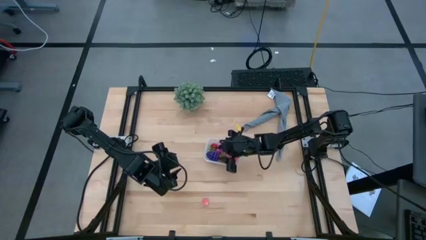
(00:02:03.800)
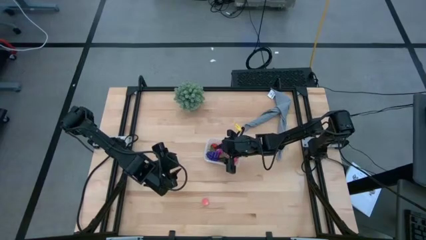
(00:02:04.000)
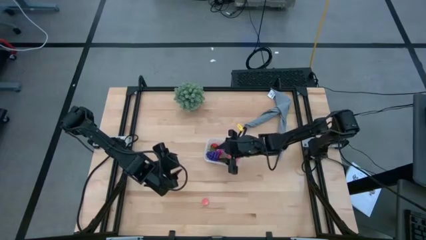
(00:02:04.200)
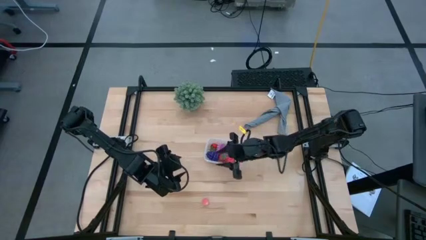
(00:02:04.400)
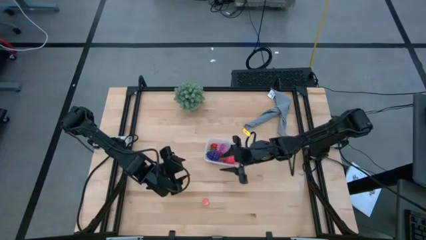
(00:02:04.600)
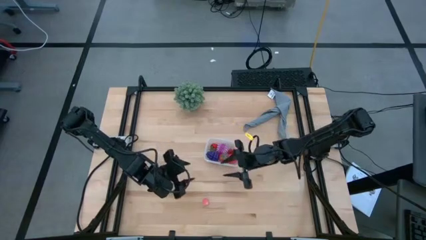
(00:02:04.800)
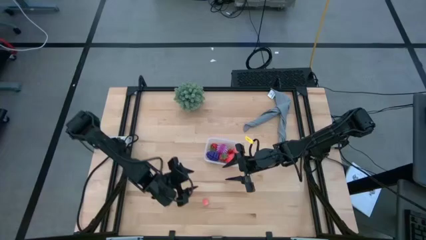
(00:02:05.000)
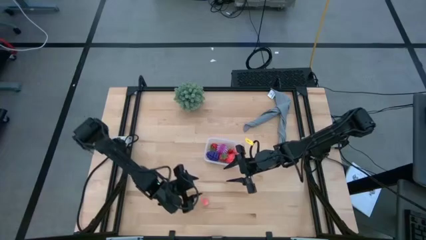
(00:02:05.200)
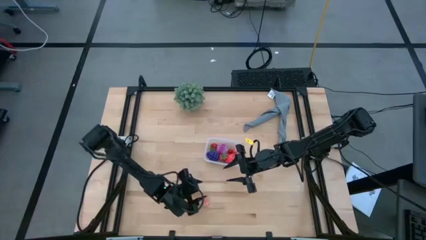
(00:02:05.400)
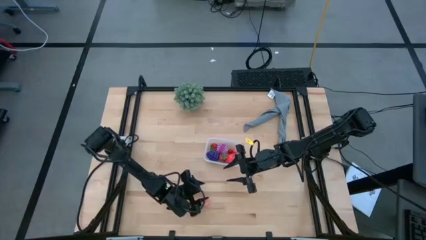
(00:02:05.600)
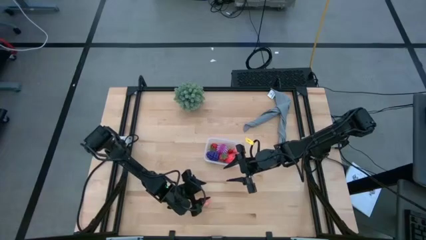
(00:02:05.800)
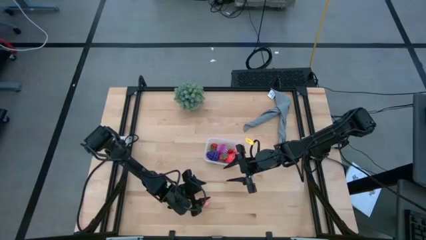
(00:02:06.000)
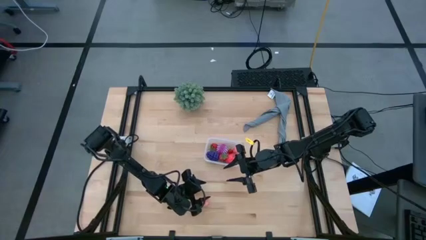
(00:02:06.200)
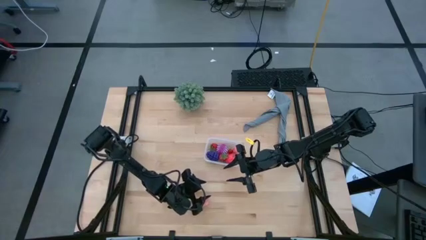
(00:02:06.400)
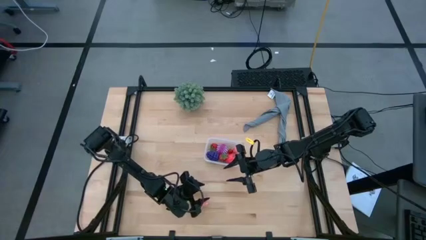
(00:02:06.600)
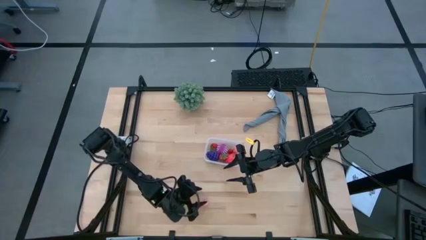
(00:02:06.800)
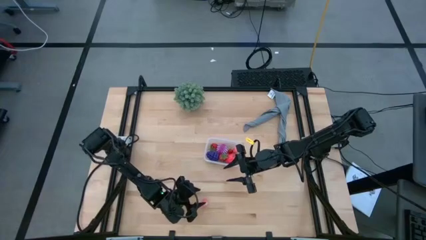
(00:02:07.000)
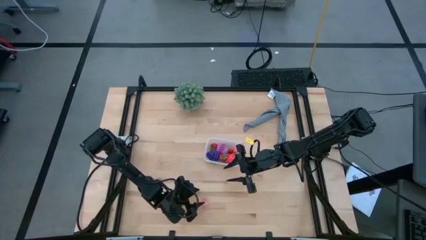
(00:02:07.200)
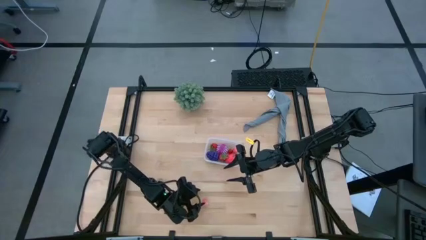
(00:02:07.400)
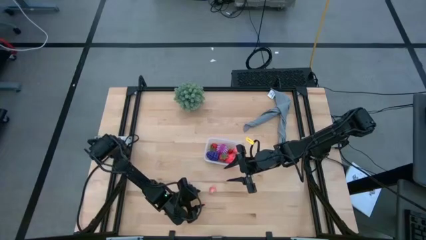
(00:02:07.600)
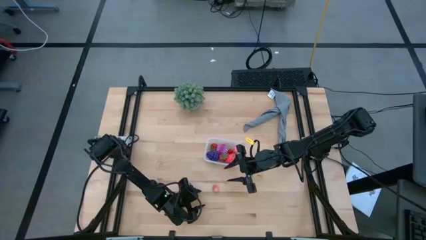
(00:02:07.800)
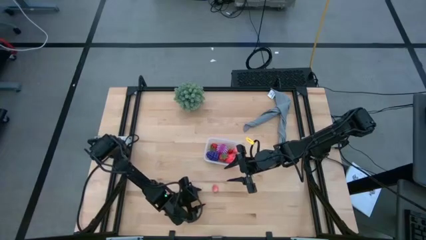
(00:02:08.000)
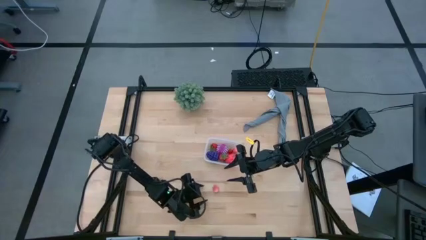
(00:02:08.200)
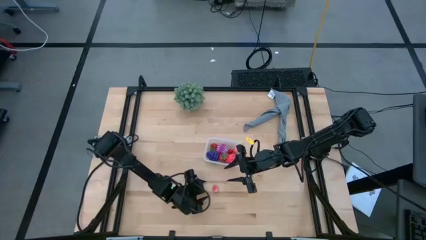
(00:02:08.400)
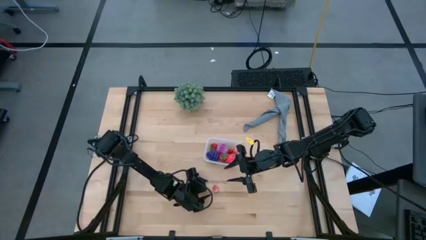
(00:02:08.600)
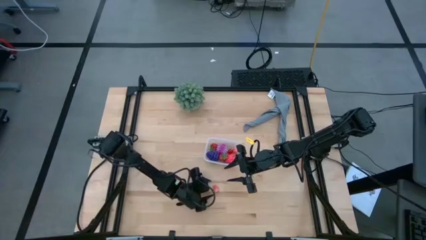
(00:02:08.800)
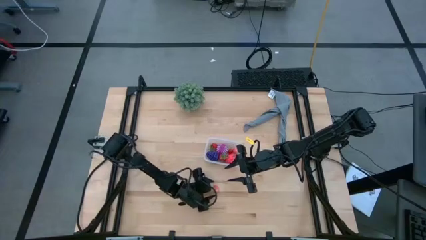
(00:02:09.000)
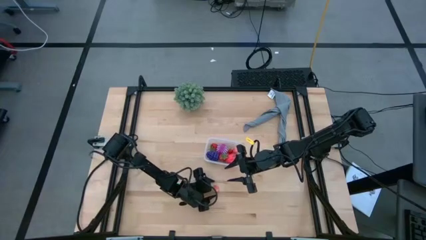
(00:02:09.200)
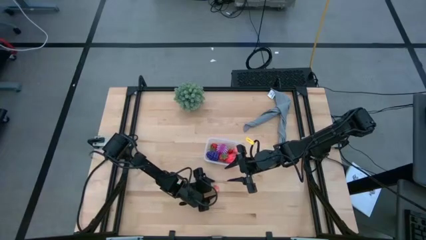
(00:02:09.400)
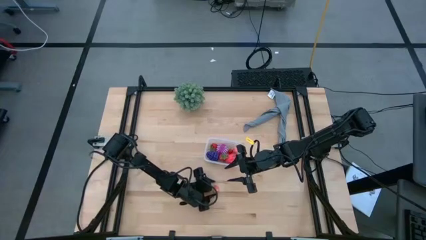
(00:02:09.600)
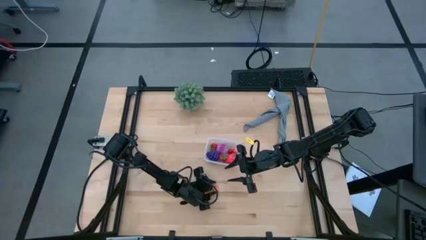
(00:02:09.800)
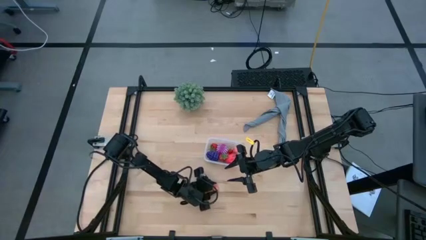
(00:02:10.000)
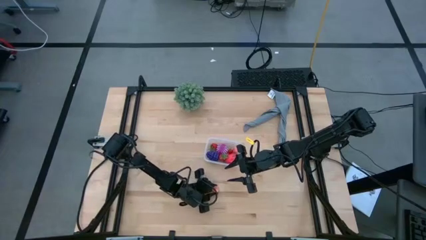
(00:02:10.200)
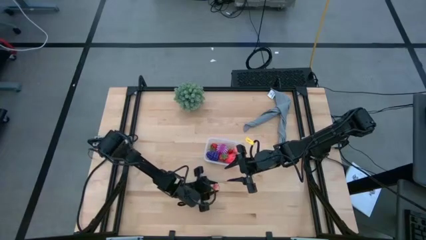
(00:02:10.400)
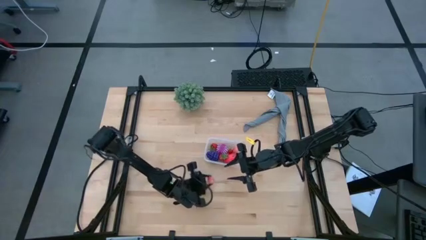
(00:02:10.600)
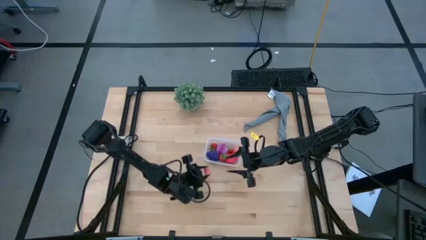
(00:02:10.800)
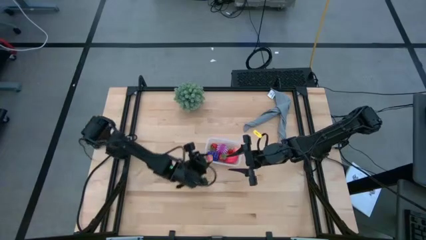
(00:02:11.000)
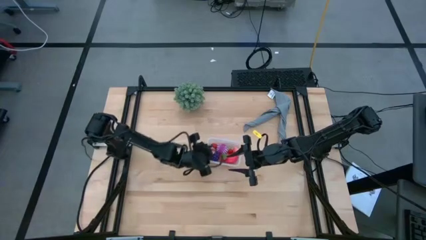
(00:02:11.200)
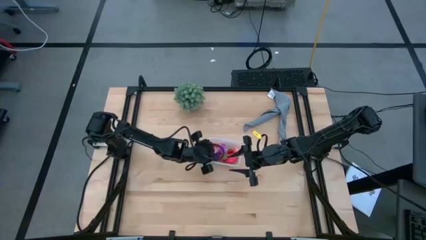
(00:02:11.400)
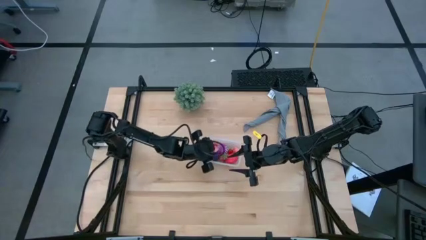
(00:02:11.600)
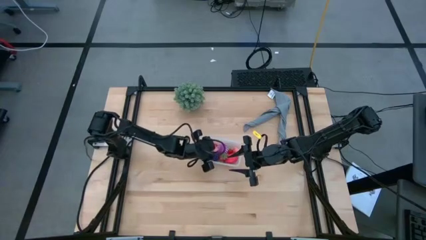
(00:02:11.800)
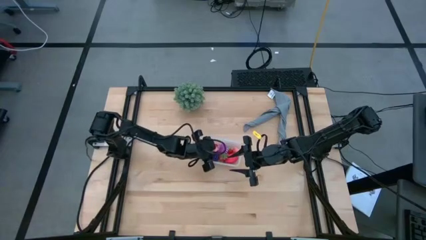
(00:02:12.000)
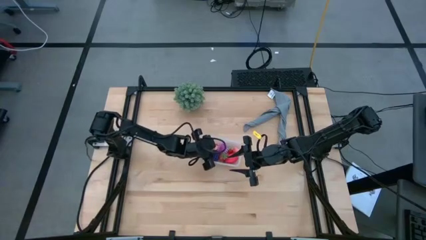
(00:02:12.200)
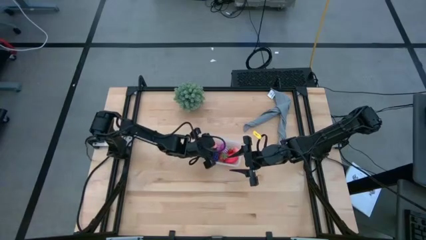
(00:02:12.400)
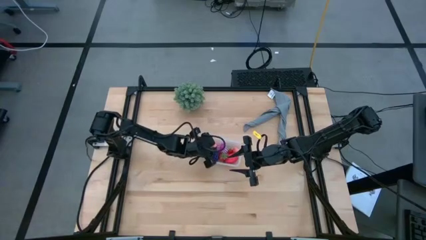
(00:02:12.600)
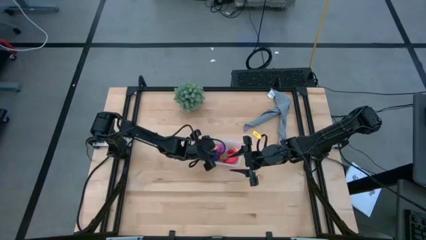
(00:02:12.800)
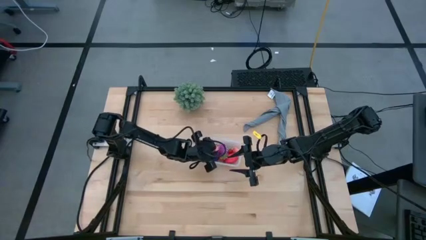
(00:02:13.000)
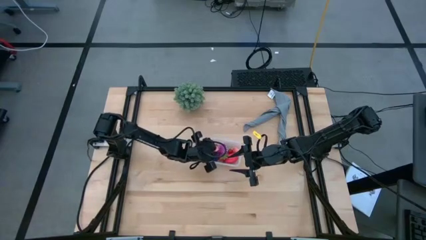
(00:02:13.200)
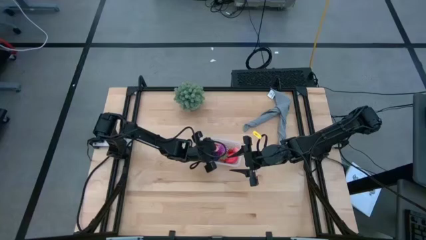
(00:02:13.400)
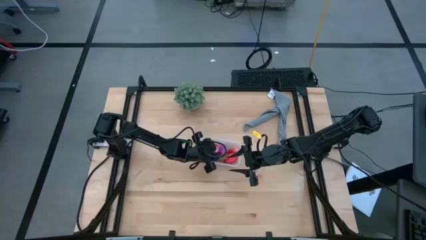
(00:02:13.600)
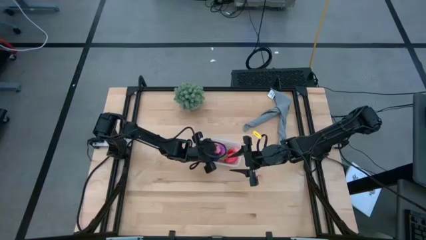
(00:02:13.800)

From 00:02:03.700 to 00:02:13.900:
Task: Pick and placing Produce into tupperware
Put the peach into the transparent container

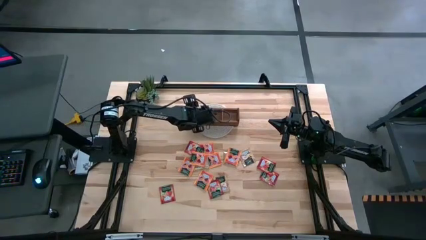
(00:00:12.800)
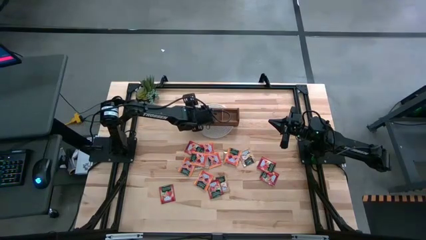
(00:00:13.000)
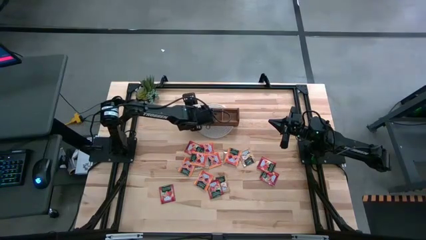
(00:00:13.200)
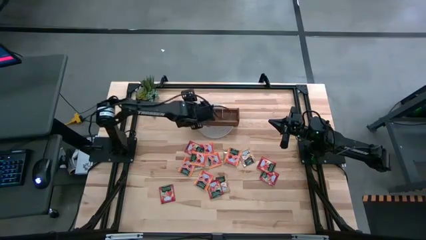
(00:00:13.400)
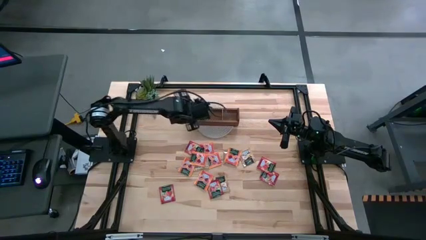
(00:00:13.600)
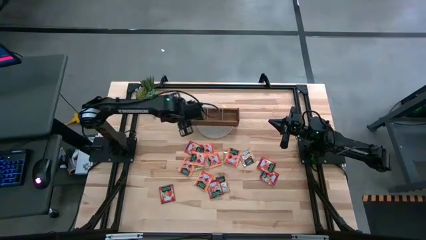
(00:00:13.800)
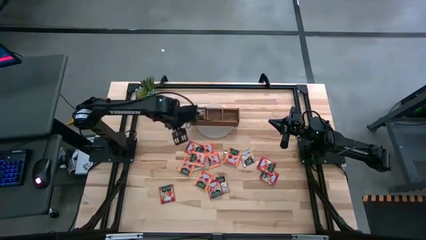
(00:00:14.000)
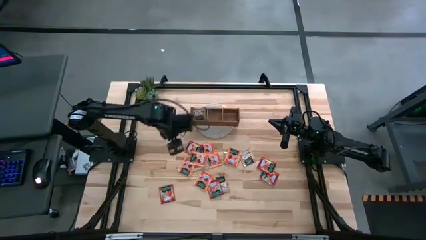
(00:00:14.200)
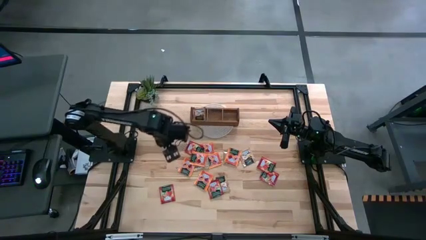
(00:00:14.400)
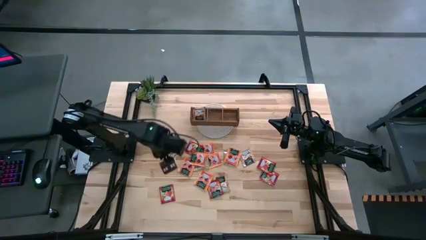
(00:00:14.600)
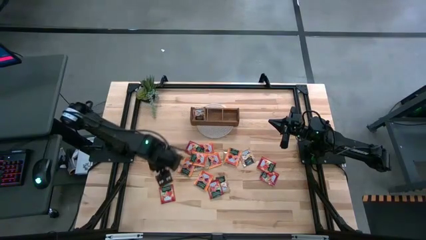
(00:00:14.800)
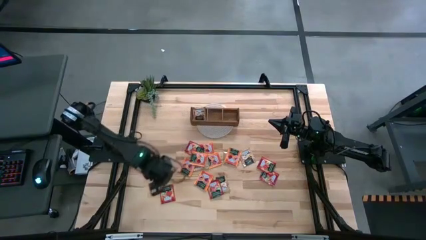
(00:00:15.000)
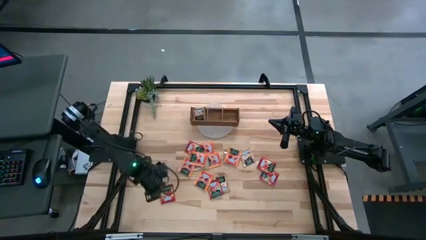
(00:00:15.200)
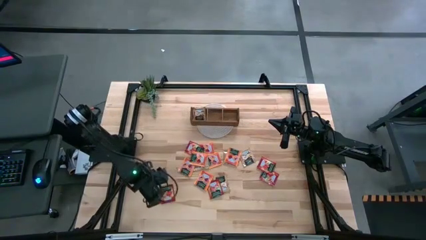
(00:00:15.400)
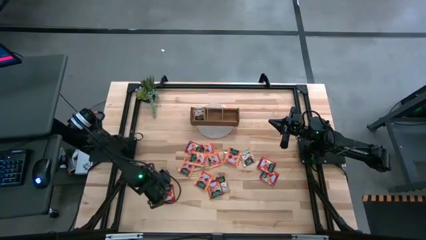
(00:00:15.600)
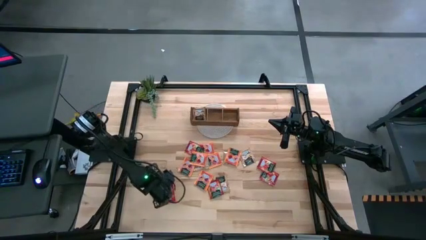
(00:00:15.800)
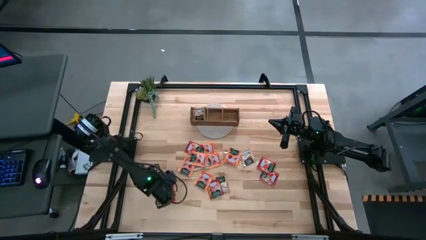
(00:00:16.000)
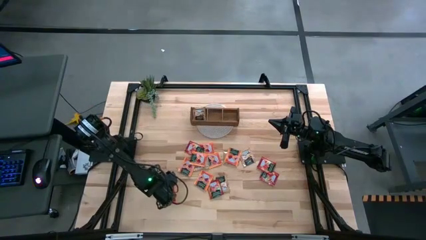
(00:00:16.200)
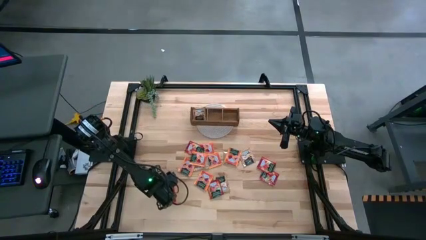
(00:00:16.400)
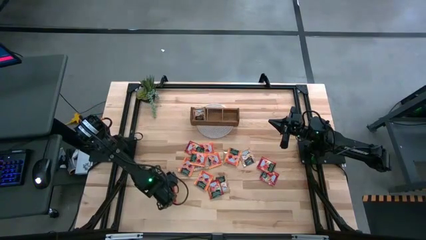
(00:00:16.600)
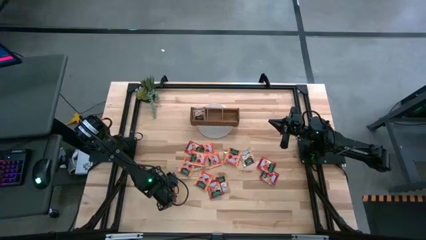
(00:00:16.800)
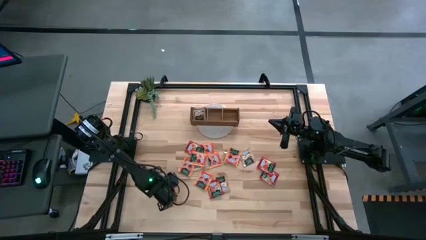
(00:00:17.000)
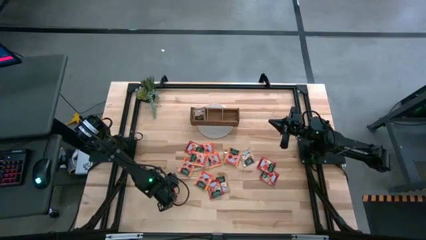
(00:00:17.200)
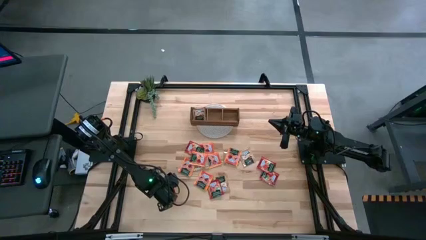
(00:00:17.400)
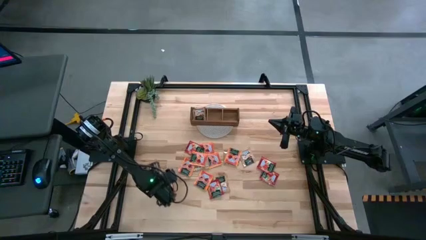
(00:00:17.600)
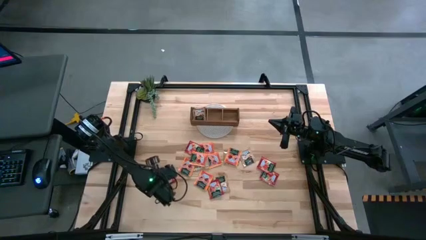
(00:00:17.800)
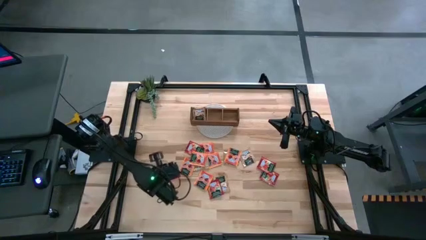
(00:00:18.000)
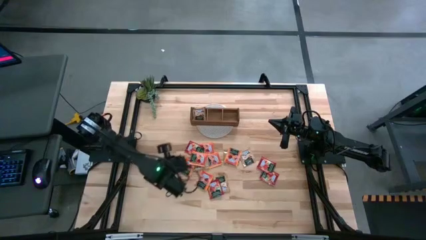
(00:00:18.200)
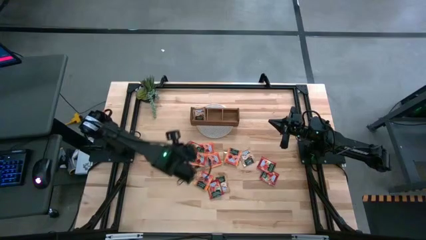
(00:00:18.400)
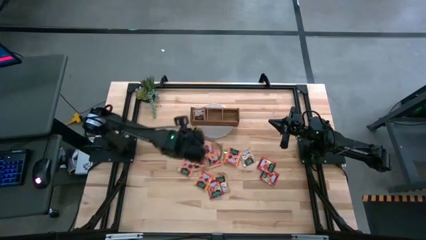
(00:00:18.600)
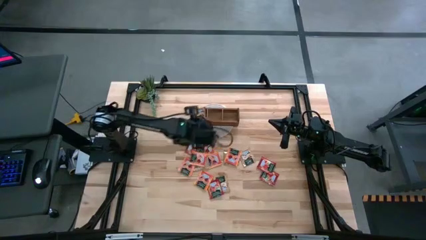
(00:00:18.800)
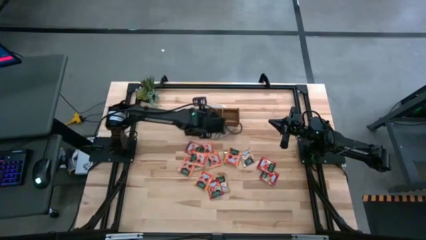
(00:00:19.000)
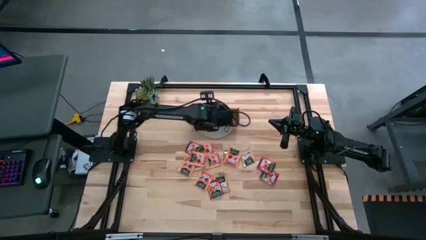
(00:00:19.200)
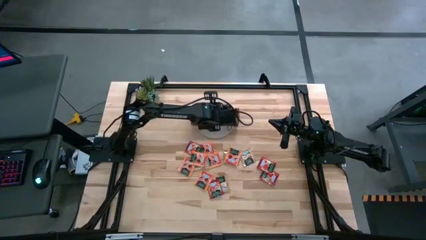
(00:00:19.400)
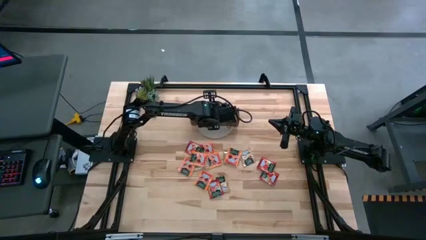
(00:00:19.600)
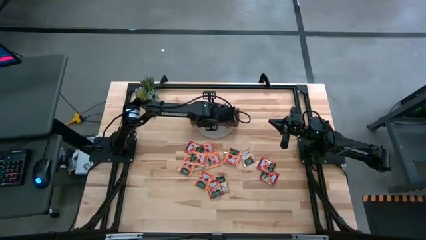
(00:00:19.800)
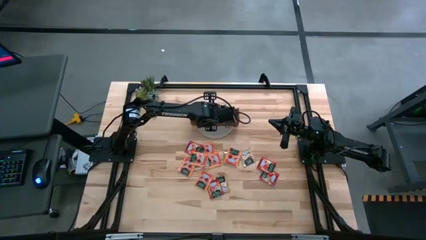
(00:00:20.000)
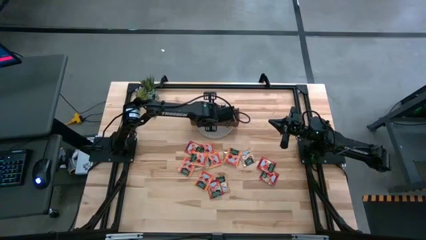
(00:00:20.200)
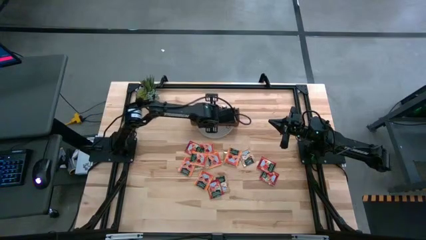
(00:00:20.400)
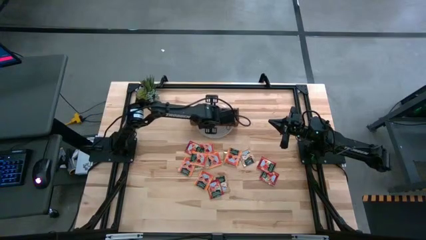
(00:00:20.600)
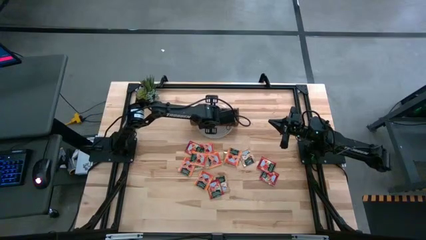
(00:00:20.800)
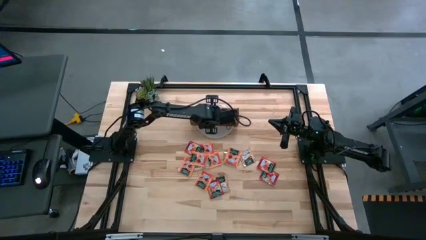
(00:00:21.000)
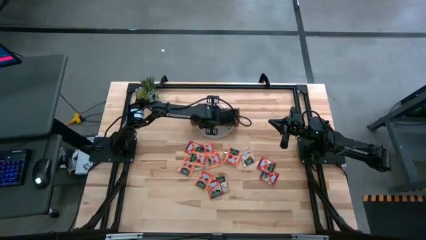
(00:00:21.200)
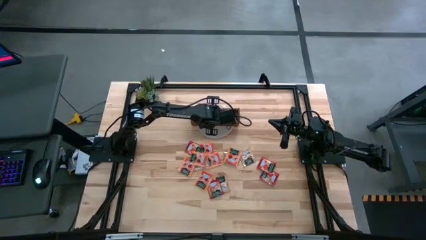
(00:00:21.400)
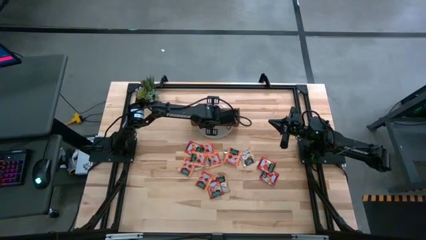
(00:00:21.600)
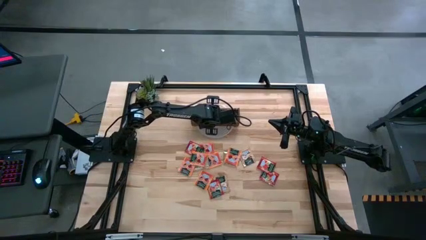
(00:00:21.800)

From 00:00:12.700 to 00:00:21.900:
Task: Pick & Place Tea
Put the red tea bag in the middle section of the wooden organizer
